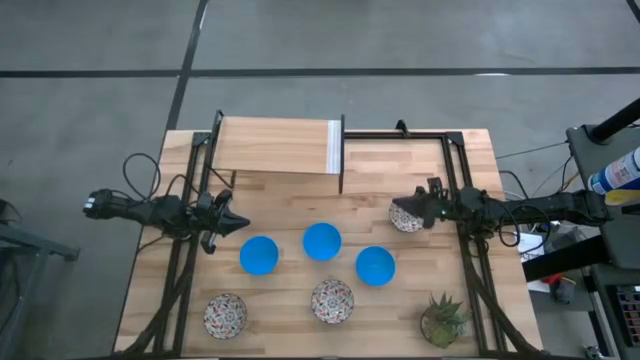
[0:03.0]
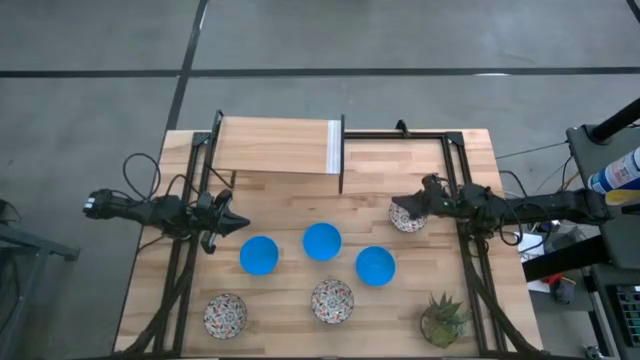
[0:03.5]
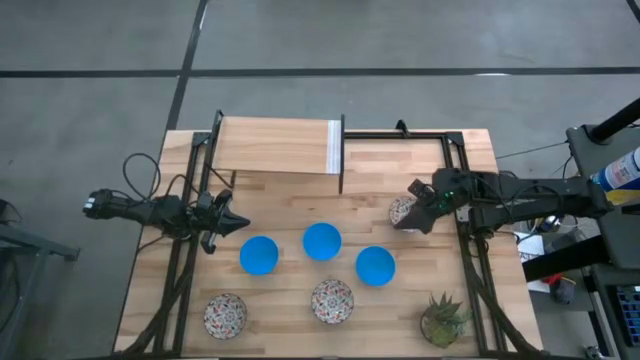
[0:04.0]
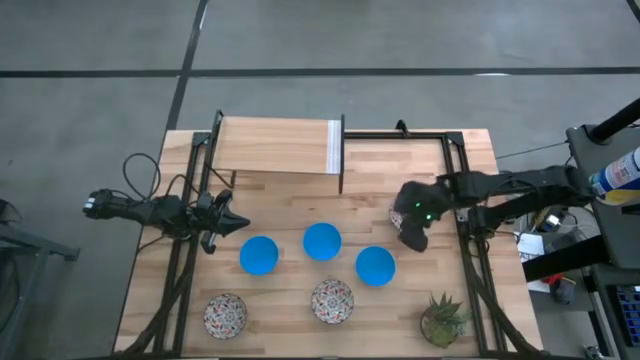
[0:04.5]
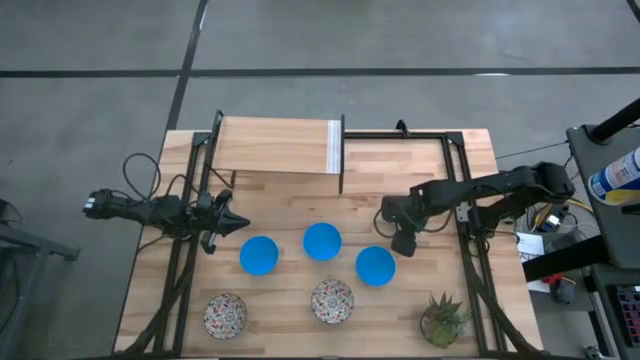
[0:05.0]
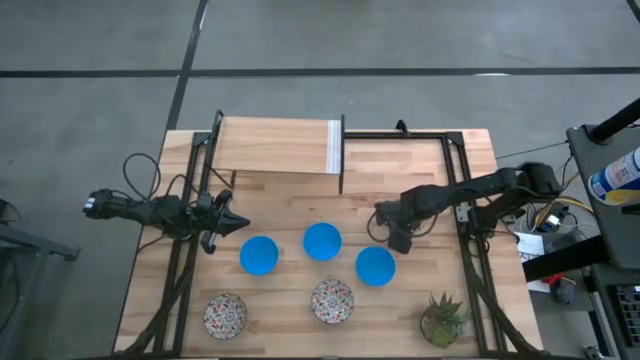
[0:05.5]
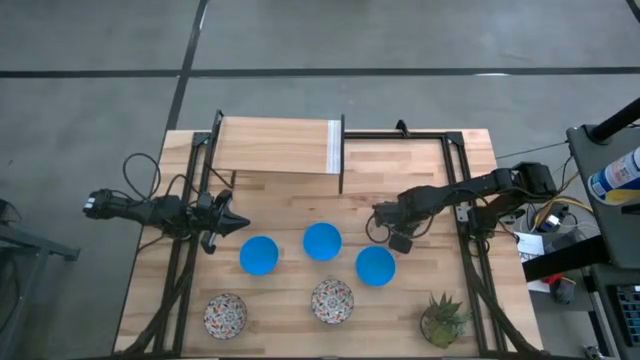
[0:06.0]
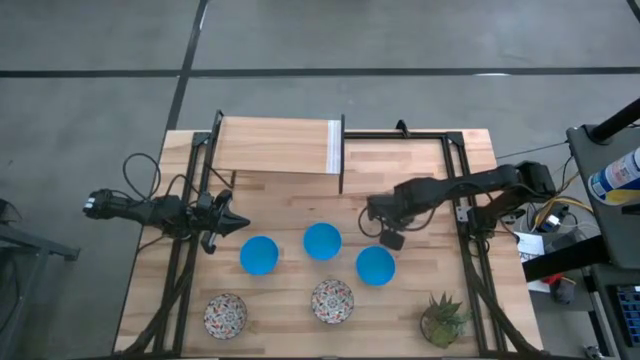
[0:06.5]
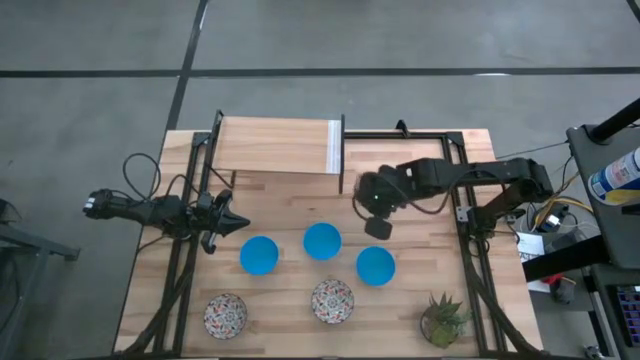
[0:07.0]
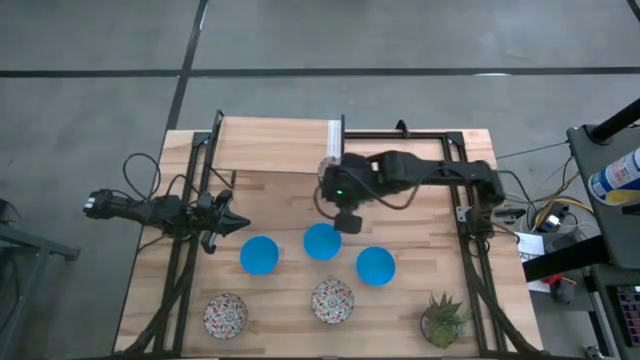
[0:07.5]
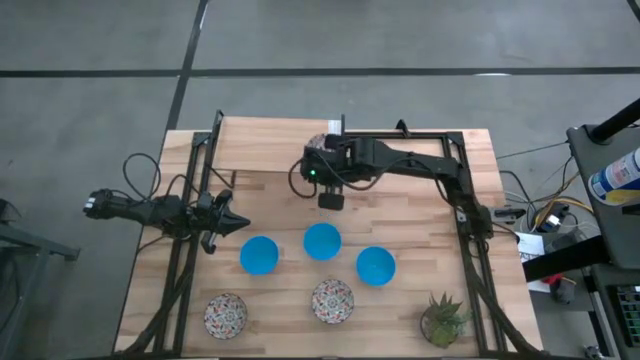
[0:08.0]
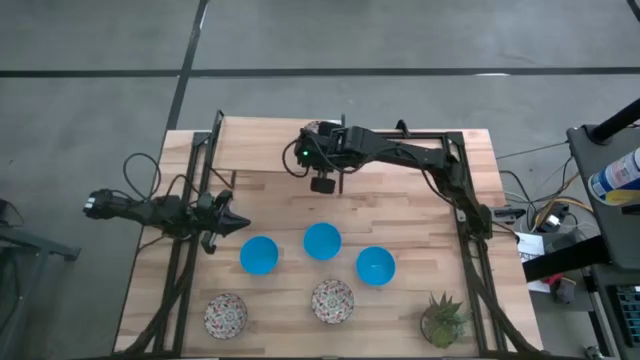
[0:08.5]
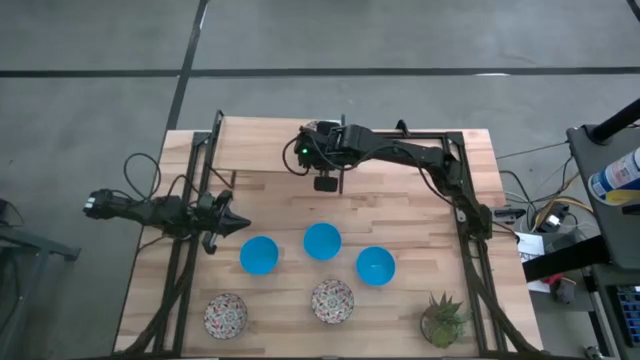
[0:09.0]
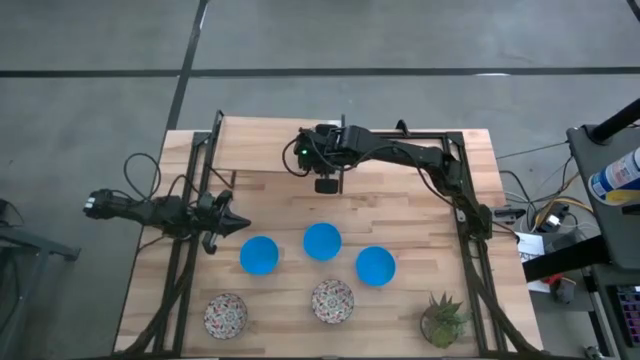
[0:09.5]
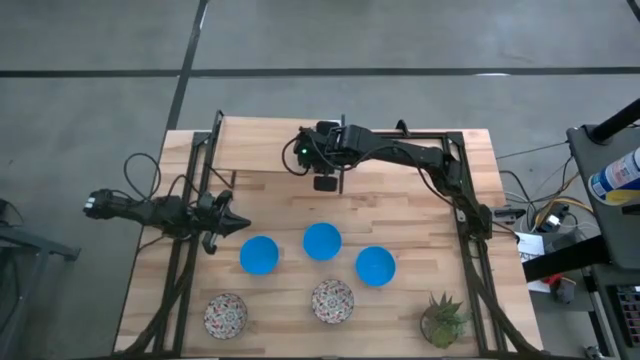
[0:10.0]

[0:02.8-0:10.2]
Task: Pick & Place Mini bowls
Put the top white patterned bowl on the shelf

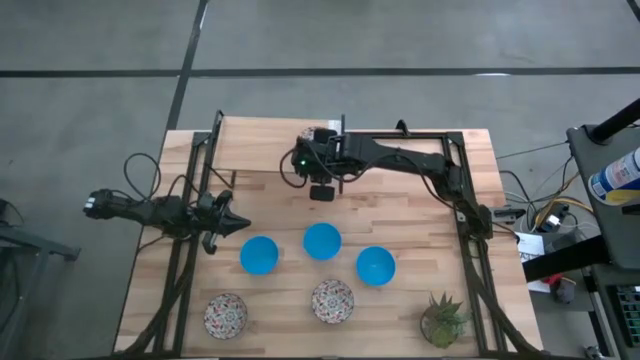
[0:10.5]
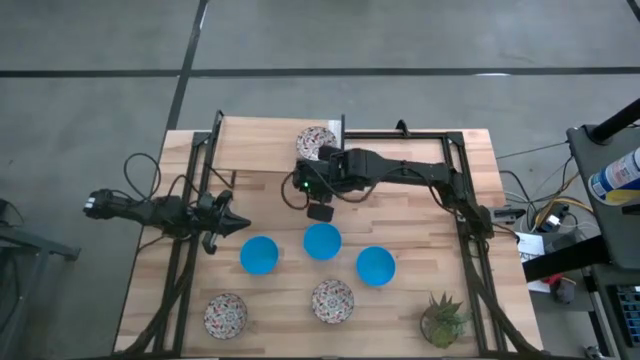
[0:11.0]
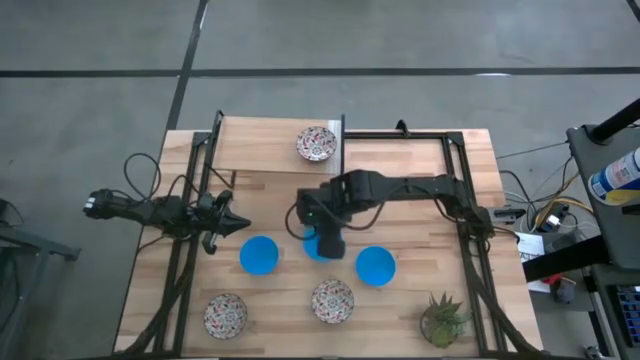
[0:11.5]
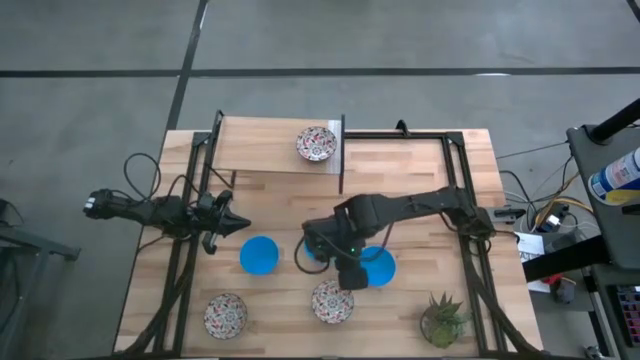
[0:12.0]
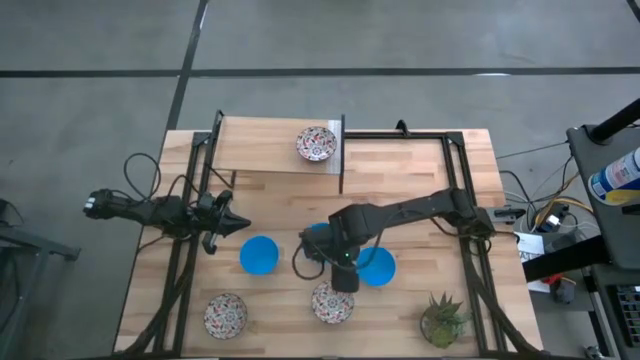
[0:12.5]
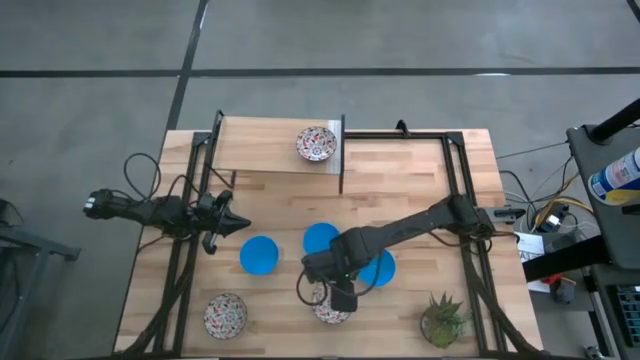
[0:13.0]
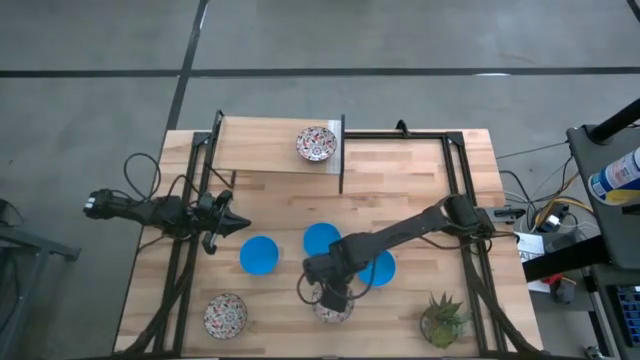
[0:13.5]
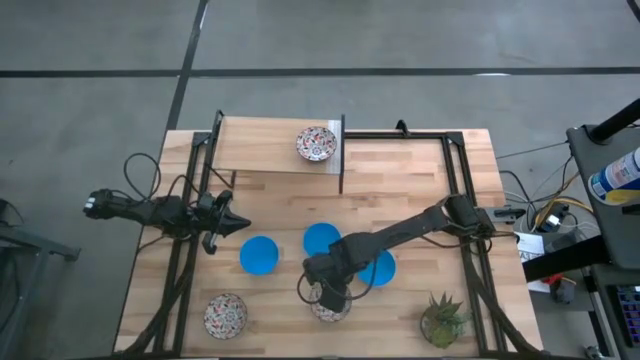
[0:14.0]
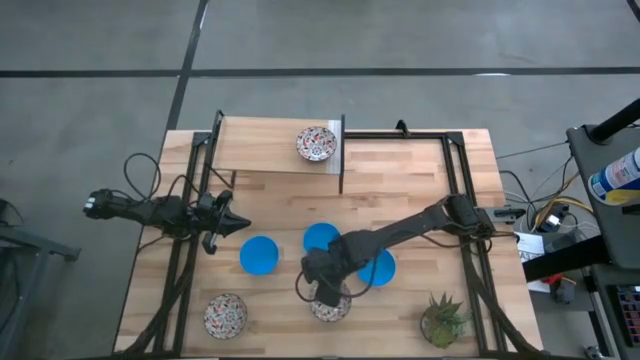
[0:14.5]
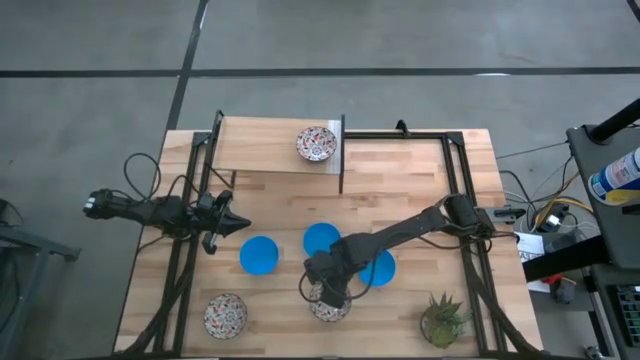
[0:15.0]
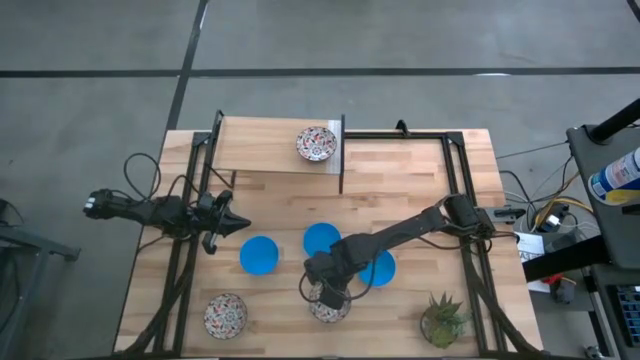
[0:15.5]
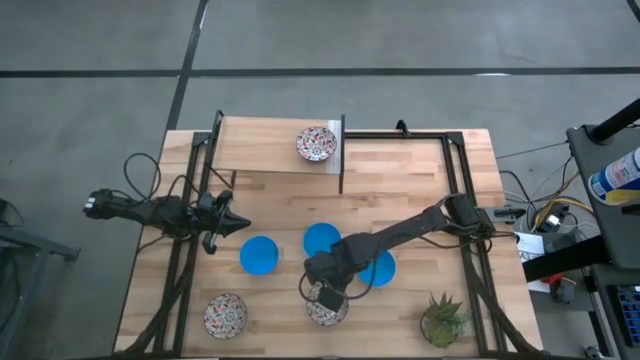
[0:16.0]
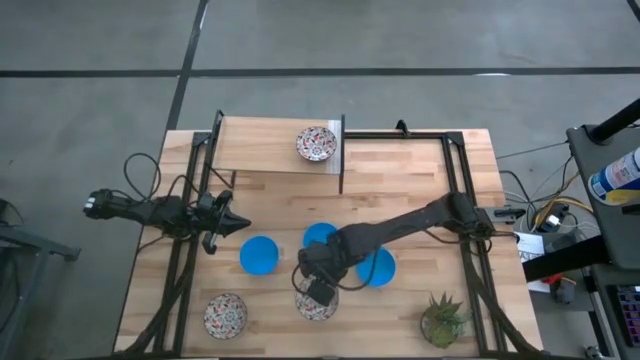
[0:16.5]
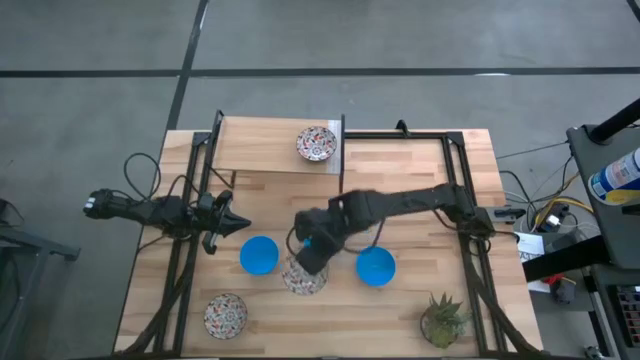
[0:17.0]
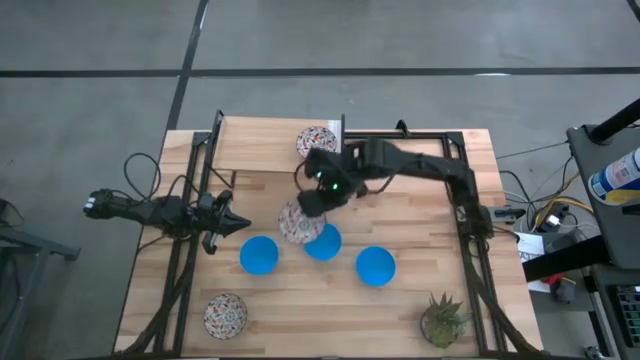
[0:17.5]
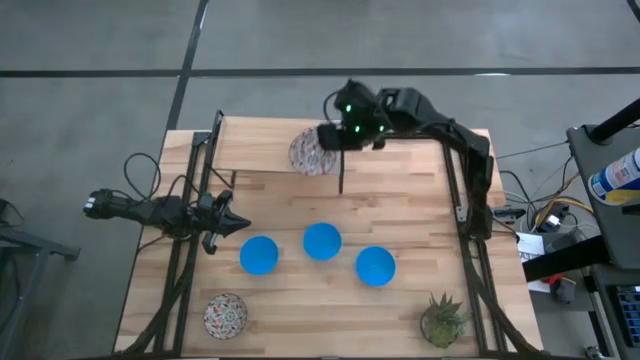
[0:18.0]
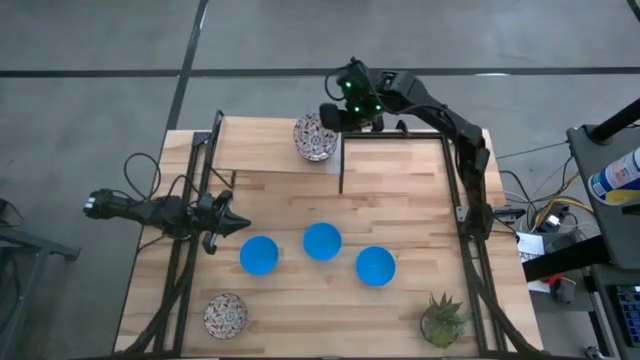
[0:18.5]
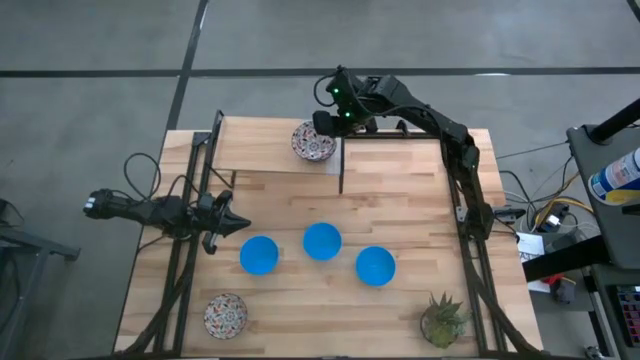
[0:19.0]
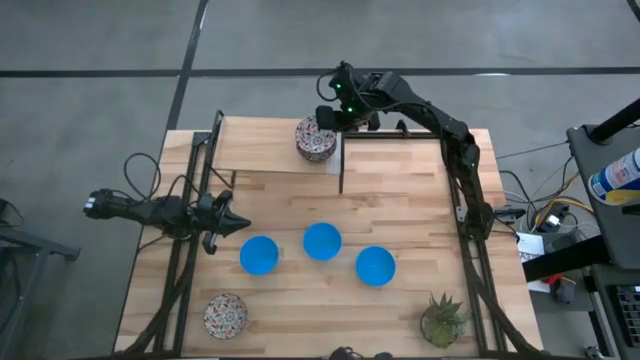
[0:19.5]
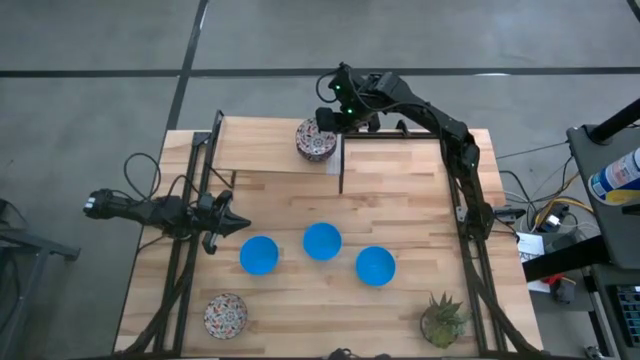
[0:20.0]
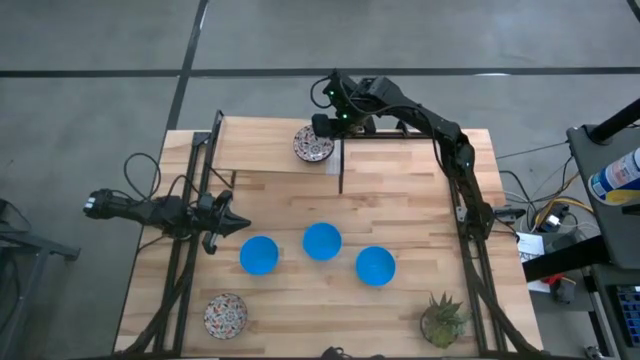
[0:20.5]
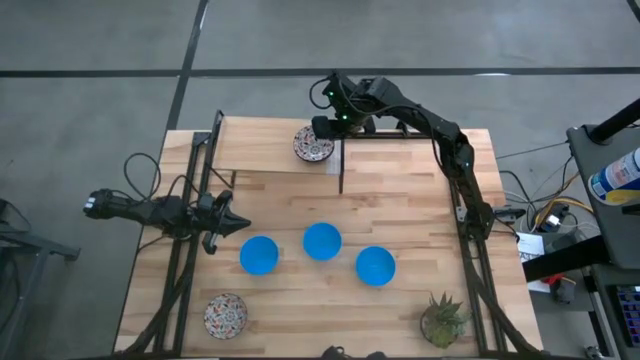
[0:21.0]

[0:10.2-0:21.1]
Stack the right white patterned bowl on top of the white patterned bowl on the shelf
